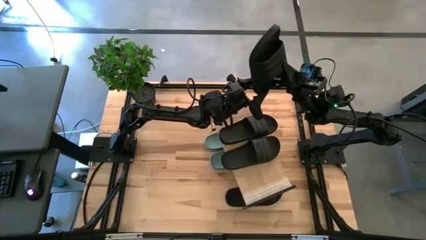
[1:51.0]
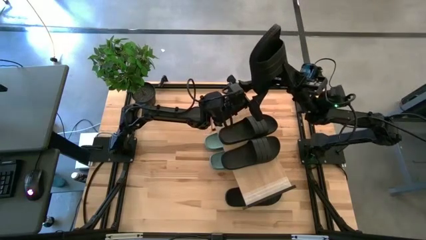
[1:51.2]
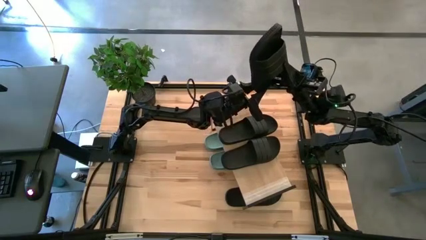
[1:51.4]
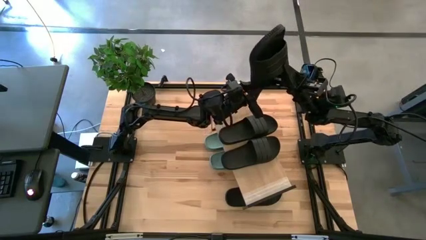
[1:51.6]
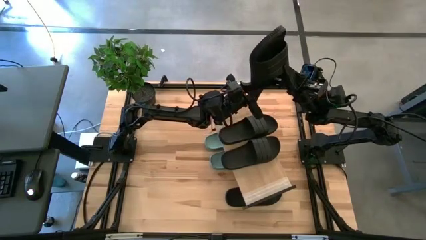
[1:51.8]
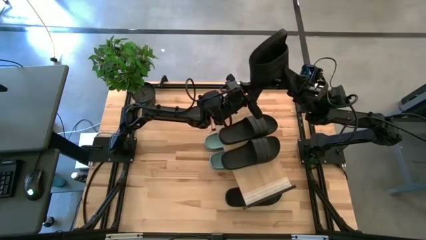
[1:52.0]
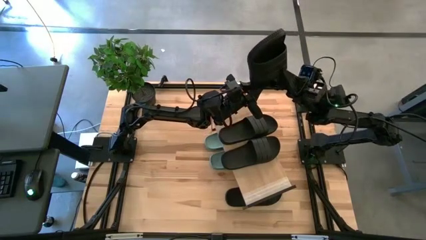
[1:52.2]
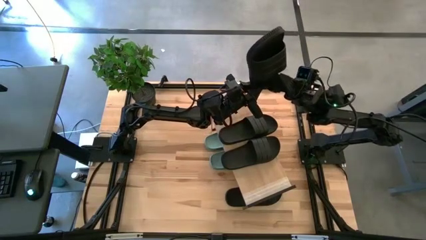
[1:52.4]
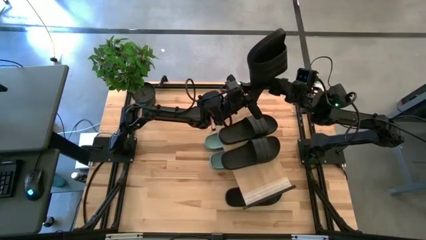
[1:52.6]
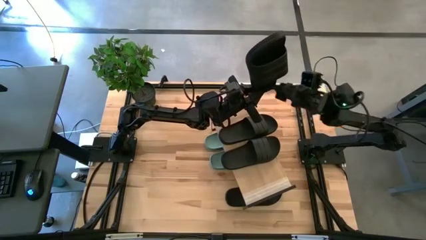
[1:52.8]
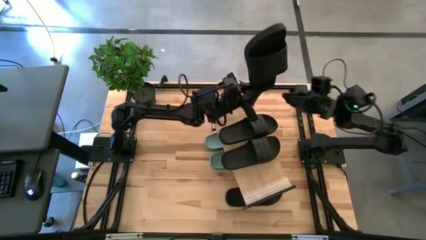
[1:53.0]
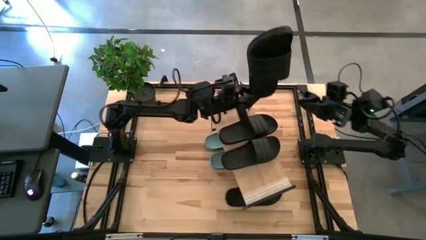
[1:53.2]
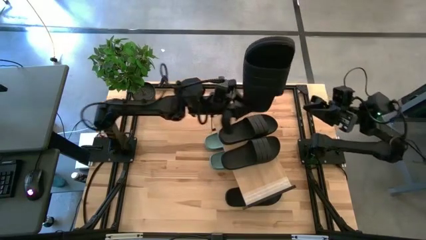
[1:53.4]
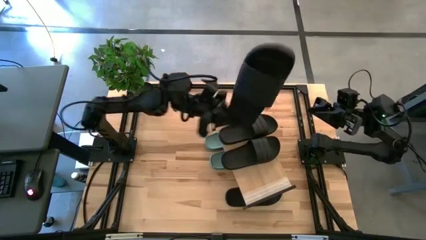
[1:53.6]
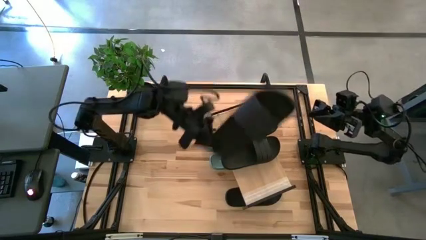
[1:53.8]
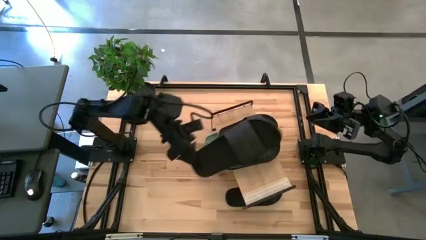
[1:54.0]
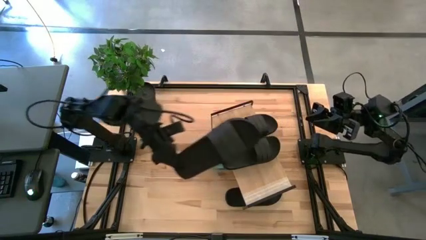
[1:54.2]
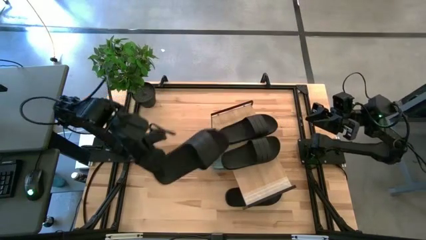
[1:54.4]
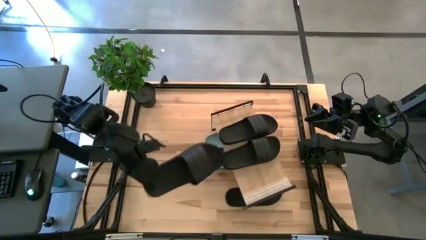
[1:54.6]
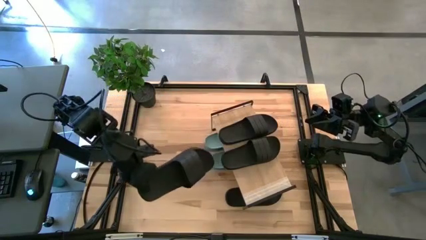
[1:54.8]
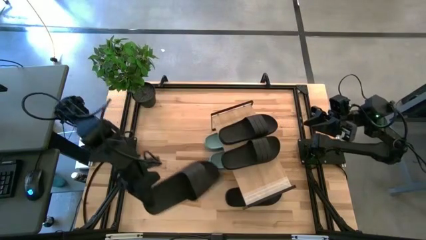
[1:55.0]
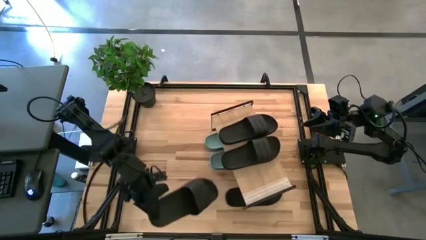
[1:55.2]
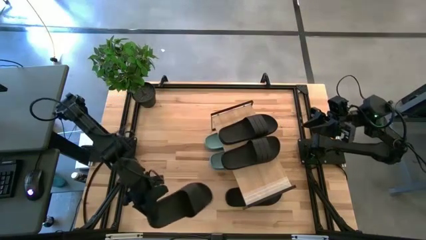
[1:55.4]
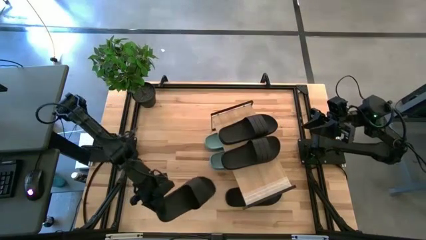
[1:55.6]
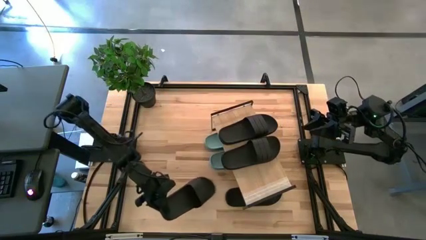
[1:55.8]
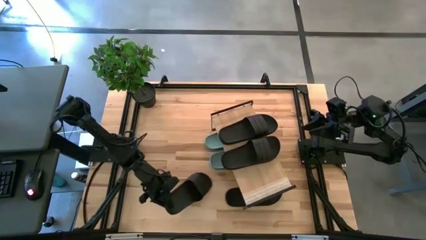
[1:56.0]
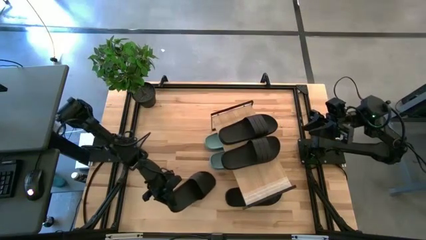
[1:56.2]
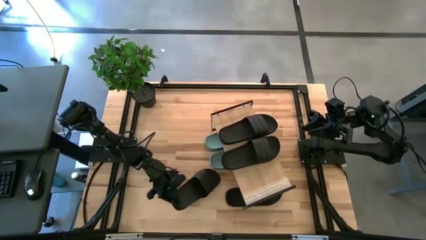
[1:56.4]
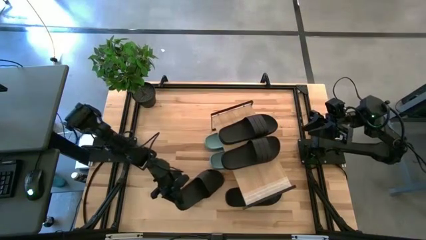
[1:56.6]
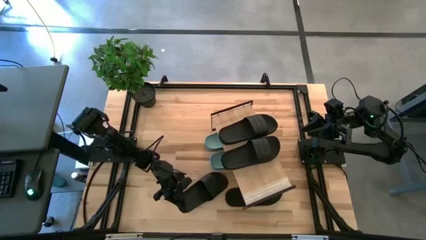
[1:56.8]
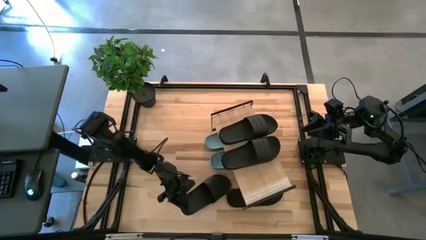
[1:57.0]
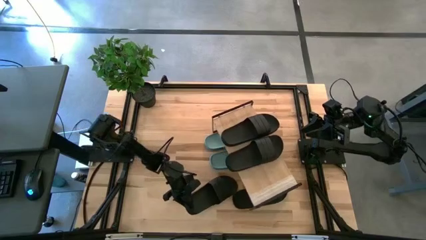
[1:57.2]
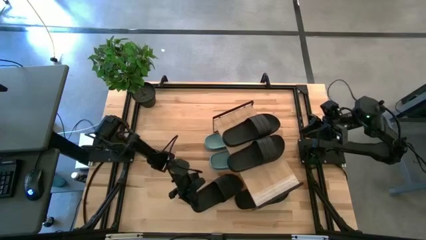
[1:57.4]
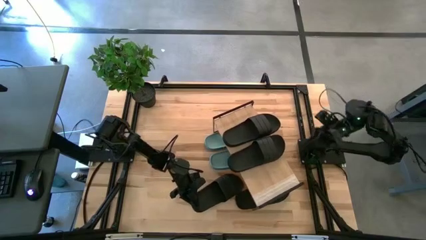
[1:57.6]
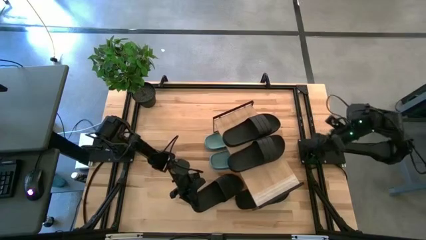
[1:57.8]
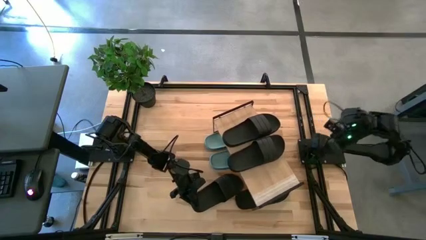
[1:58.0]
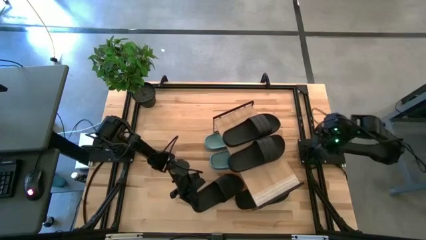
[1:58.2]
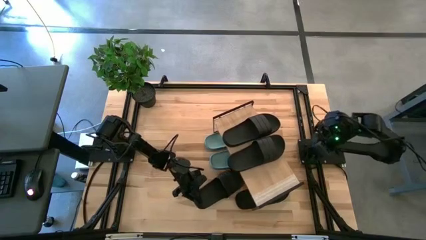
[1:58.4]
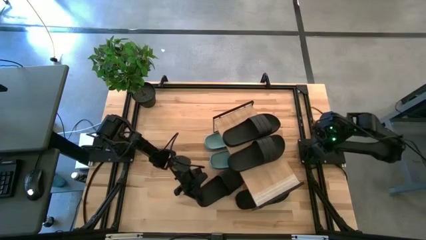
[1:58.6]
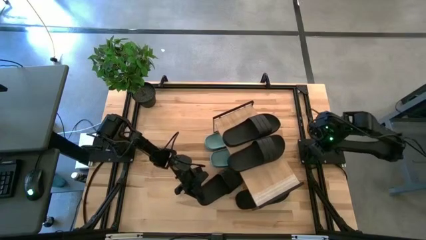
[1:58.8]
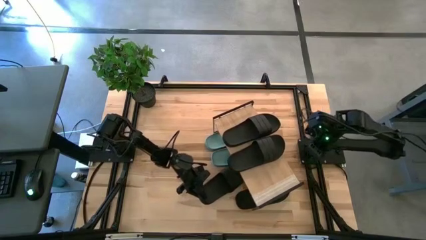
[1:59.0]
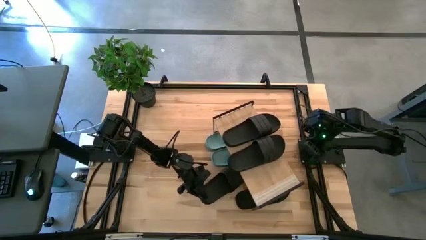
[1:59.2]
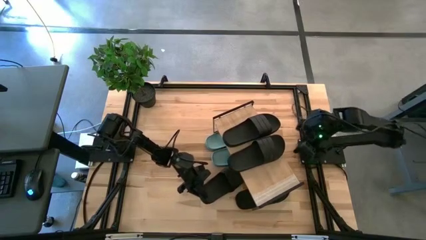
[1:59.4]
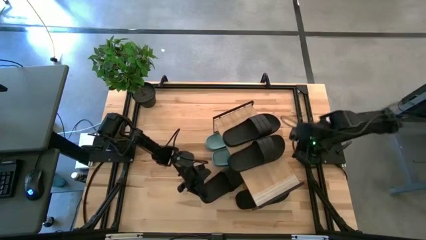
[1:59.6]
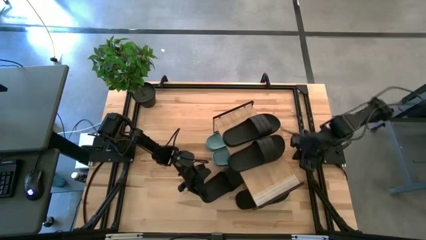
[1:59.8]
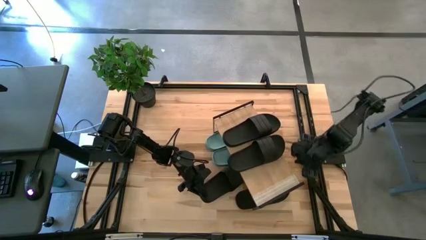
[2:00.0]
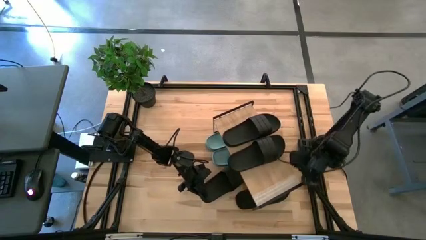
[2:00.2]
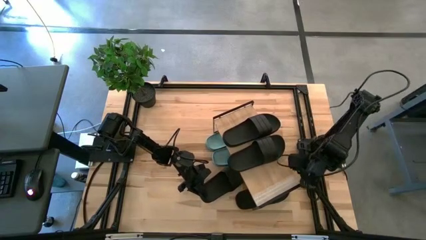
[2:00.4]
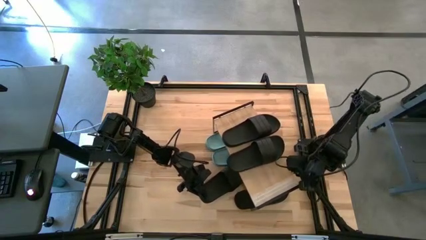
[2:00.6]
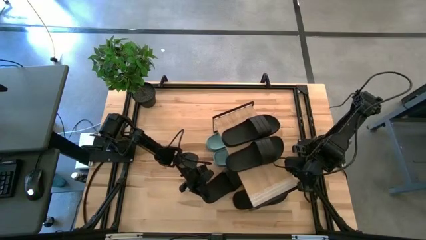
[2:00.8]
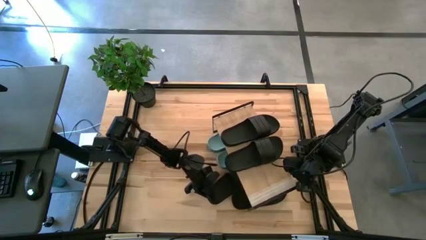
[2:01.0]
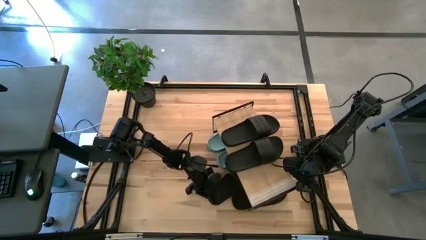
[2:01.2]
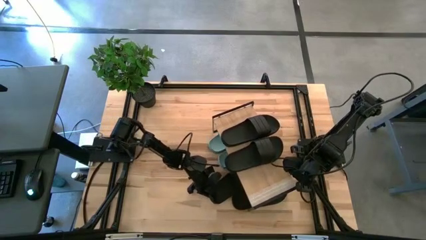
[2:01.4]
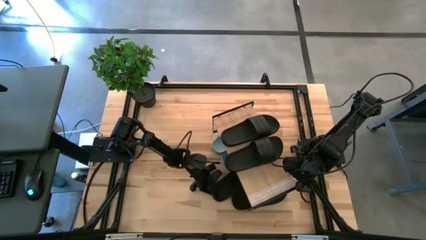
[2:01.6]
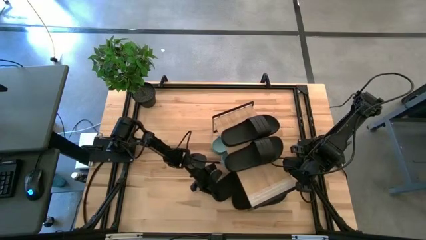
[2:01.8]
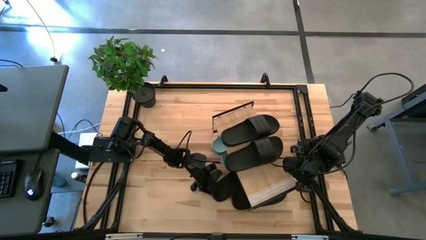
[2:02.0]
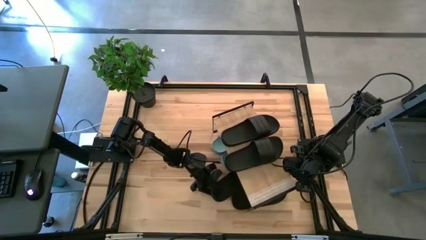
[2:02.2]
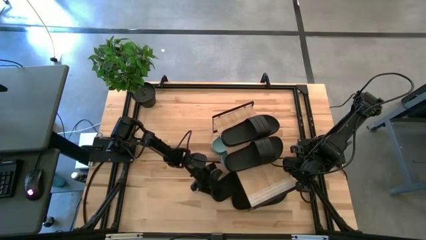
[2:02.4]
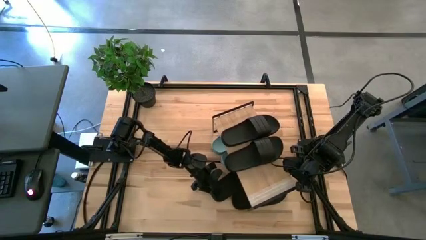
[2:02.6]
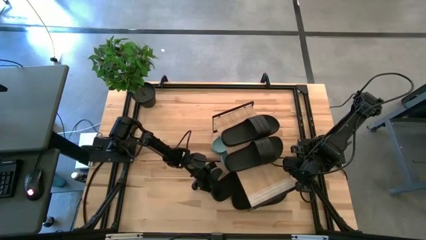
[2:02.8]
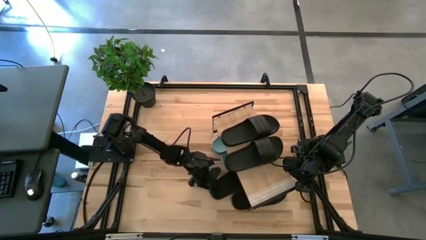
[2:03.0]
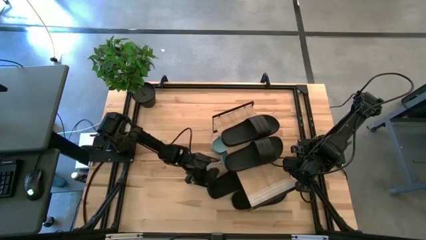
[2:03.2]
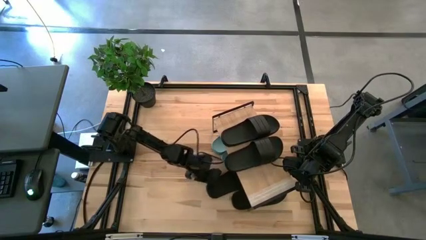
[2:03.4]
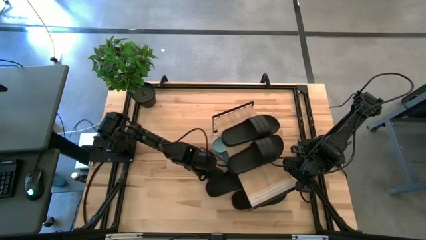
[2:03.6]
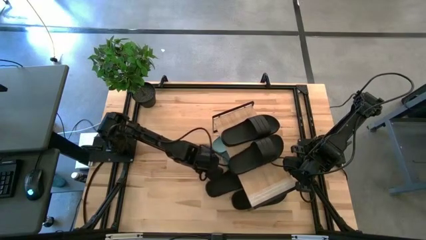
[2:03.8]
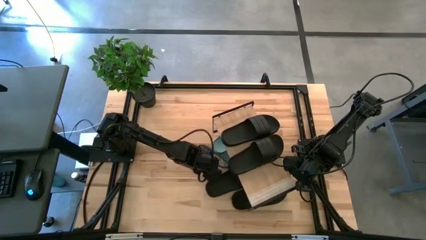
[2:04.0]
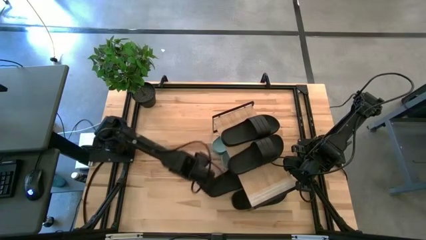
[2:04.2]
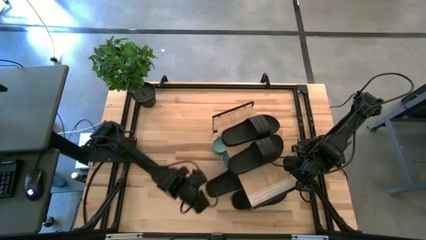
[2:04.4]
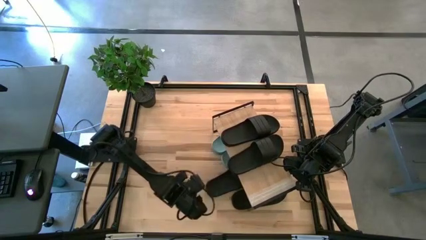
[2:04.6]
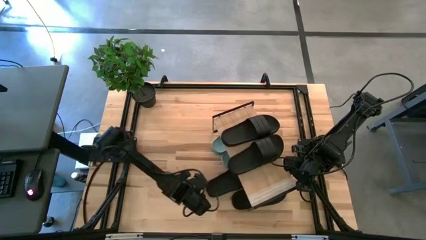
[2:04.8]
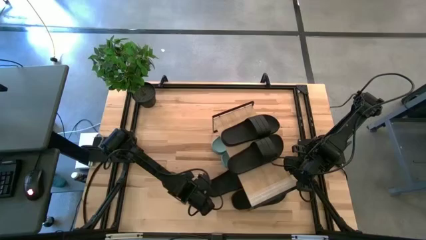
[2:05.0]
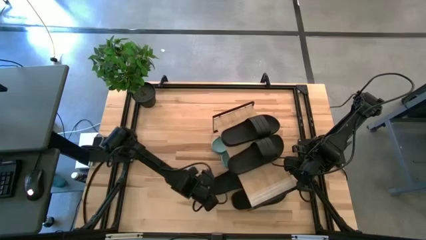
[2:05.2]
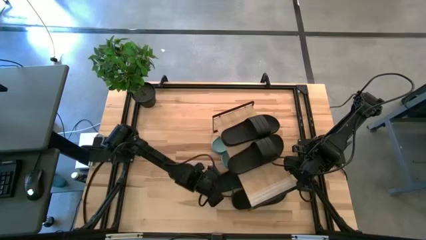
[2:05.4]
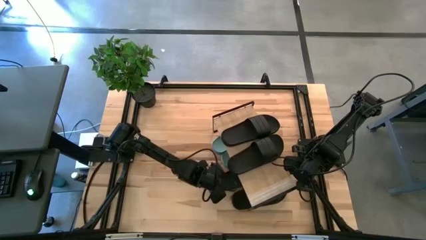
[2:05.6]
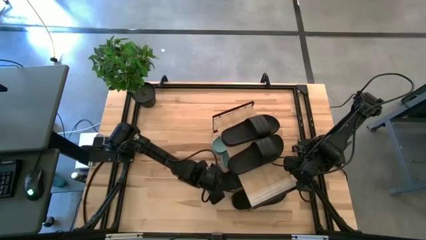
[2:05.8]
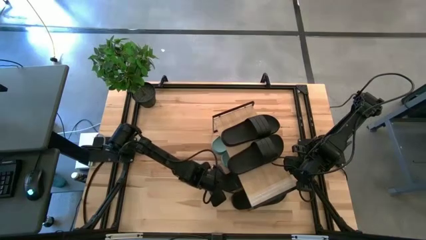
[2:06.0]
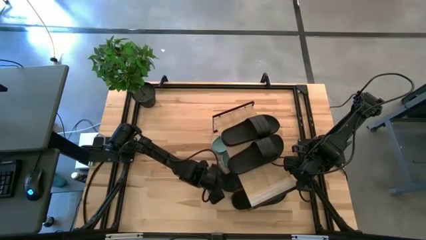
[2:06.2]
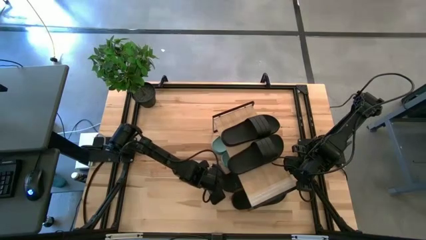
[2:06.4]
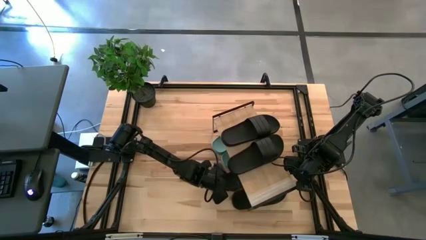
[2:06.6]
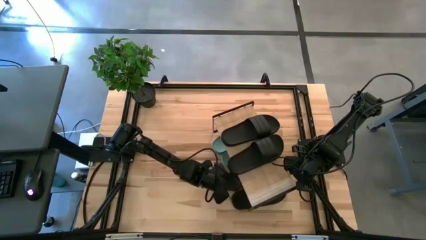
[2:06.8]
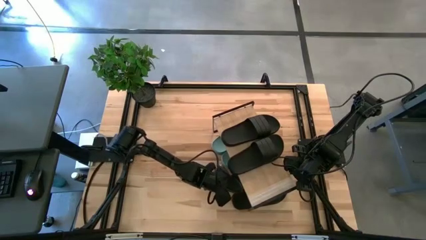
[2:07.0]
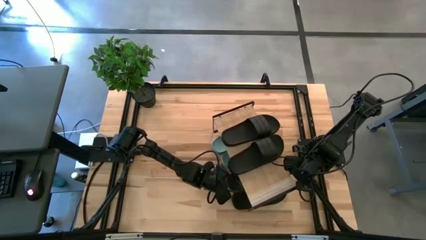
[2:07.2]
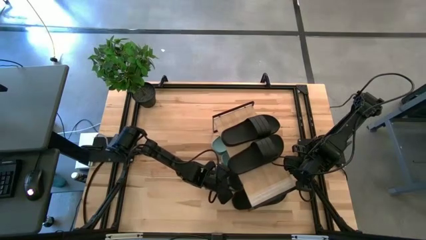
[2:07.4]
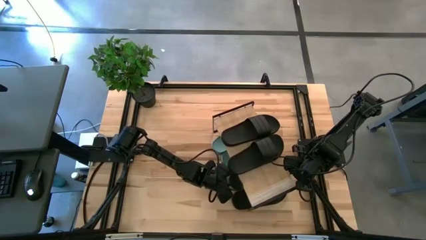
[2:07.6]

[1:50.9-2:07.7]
Task: Pick and place slides into the shelf
Put the black slides under the shelf
